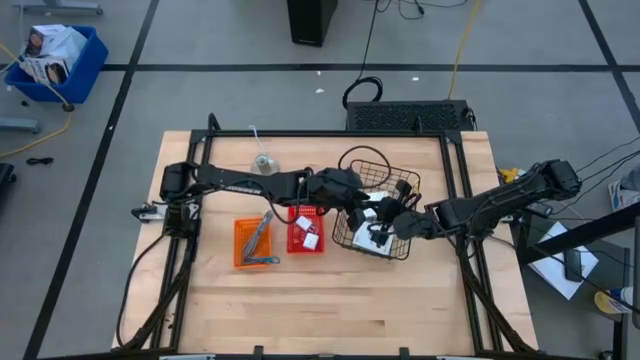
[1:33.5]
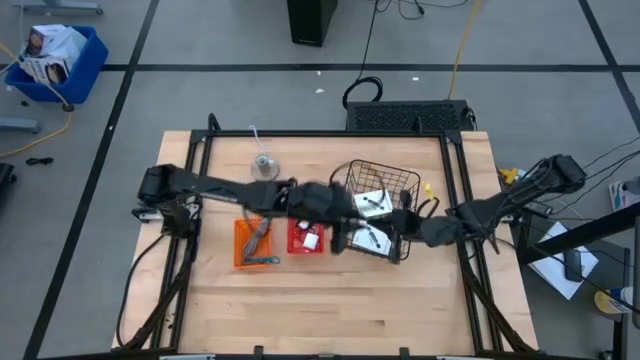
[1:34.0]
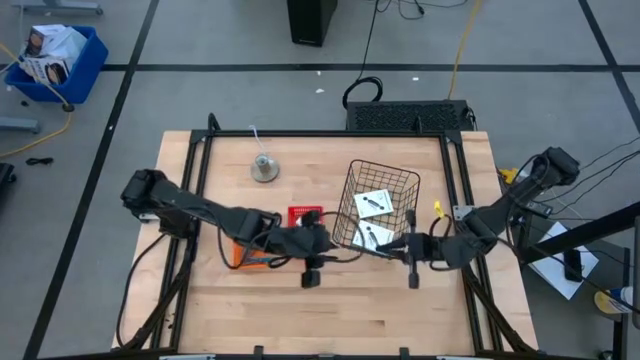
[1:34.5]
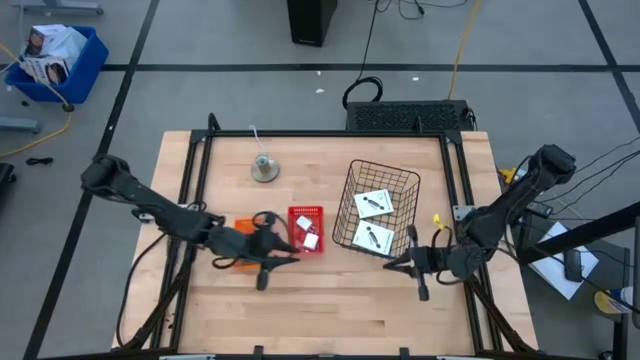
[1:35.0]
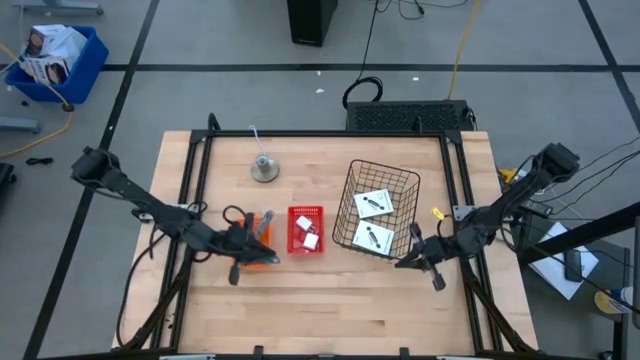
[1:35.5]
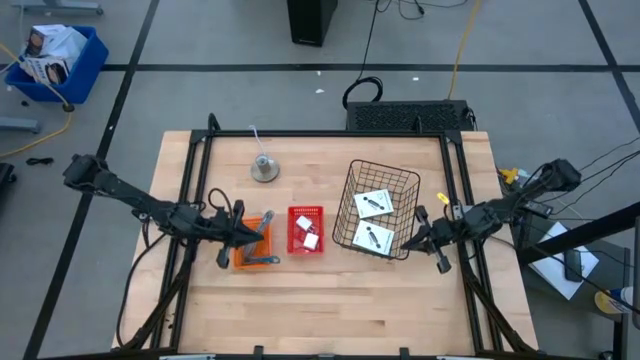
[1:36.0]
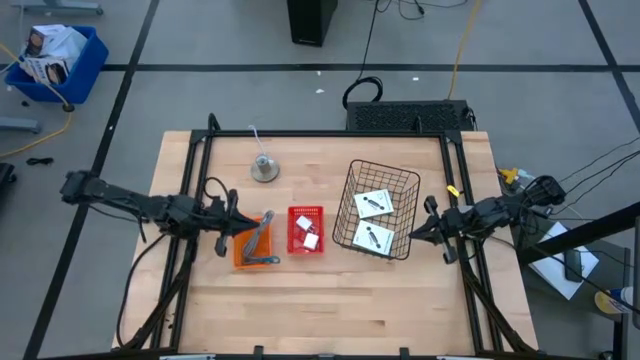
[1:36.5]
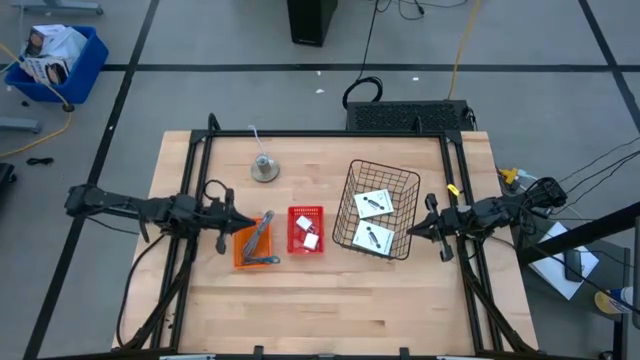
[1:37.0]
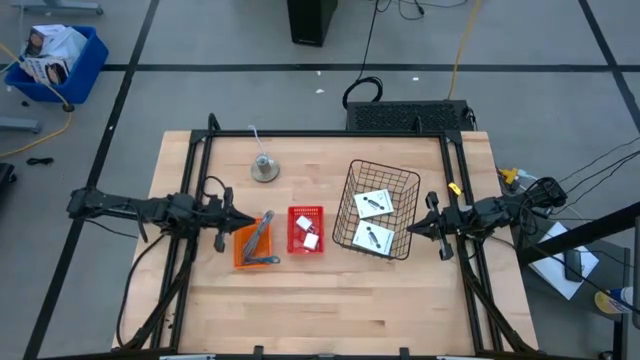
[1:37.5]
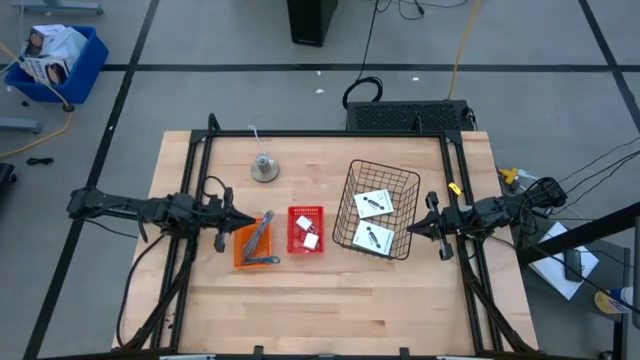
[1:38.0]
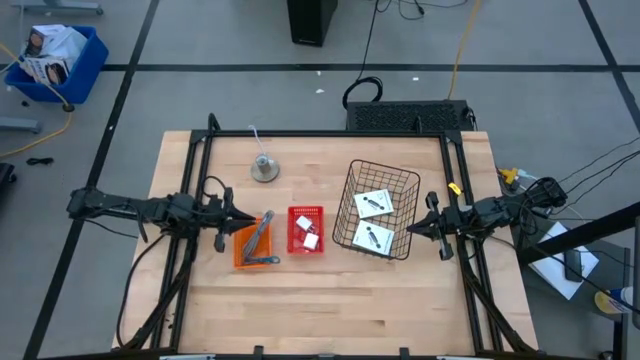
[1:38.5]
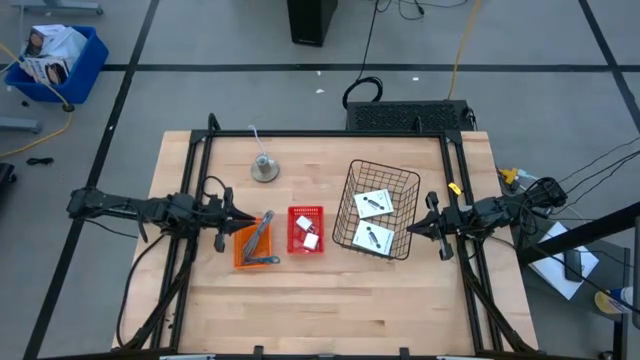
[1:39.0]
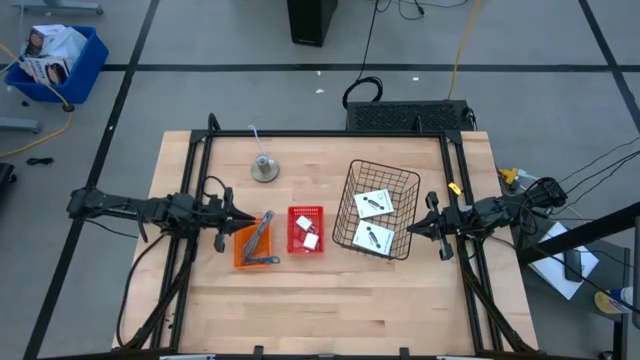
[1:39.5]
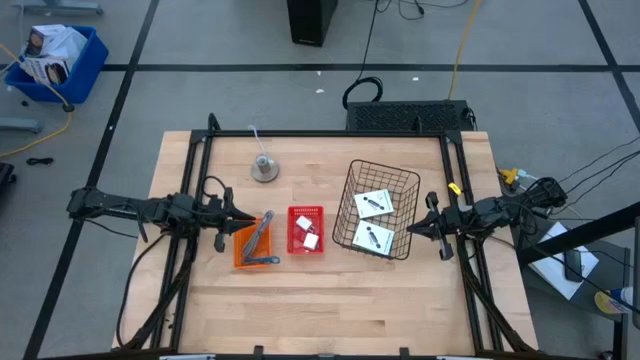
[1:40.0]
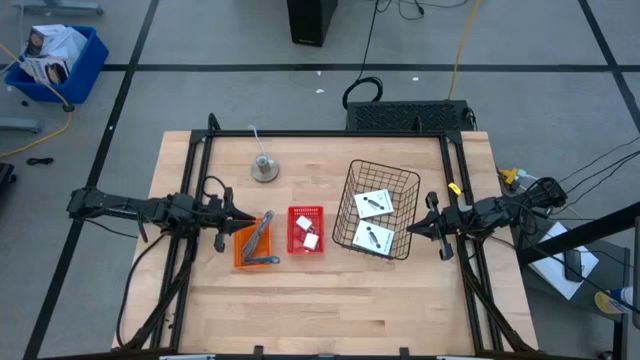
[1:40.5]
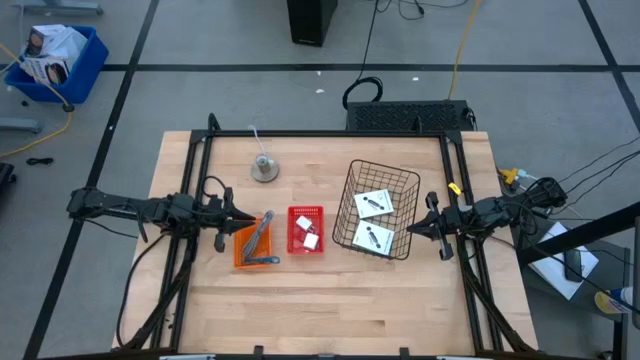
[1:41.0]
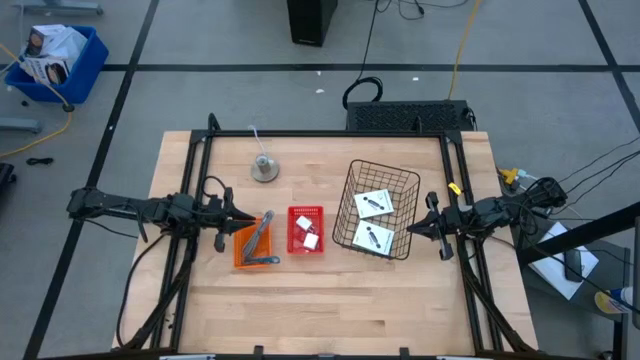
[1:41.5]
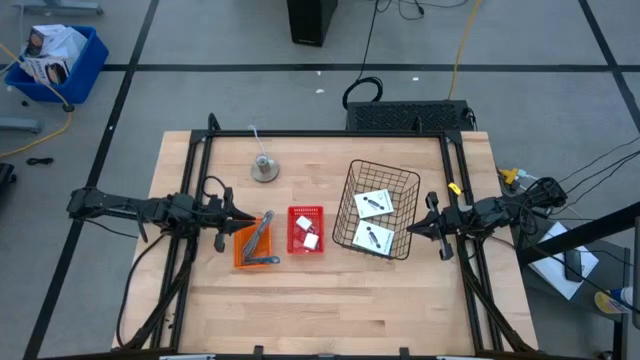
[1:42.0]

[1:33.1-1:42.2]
Task: Pick and place items into bin
Return to Home Position

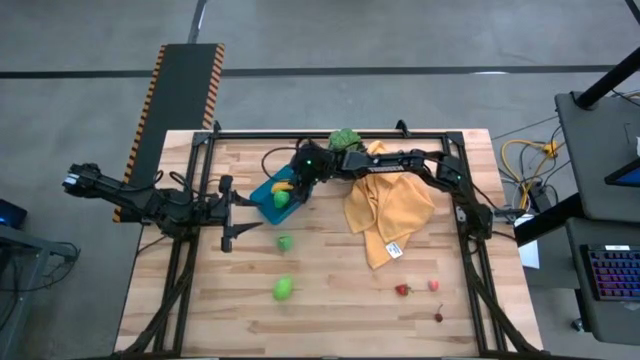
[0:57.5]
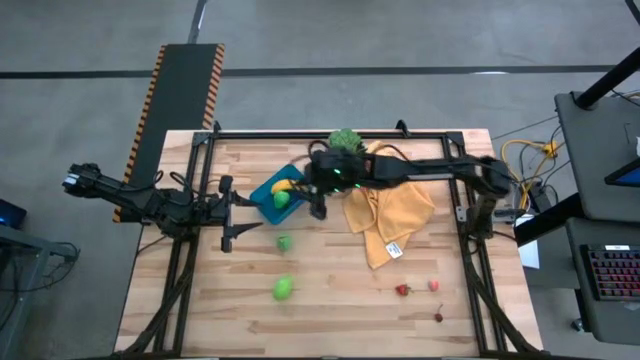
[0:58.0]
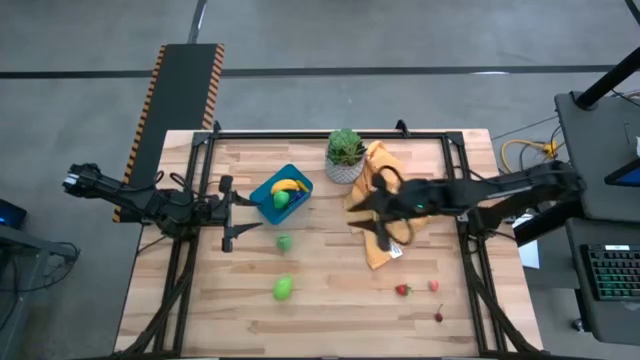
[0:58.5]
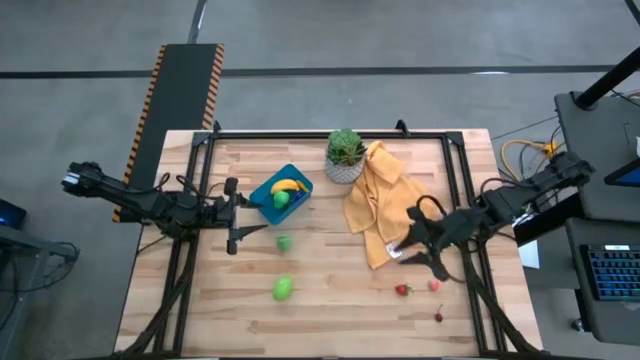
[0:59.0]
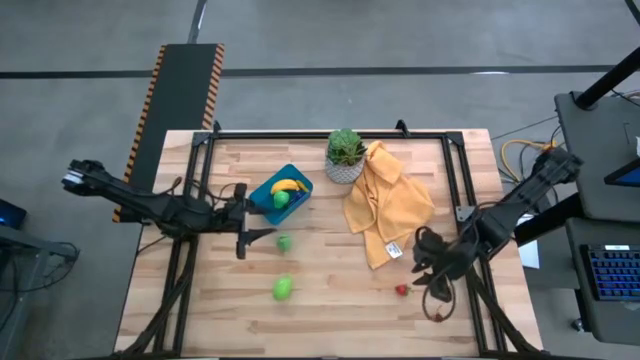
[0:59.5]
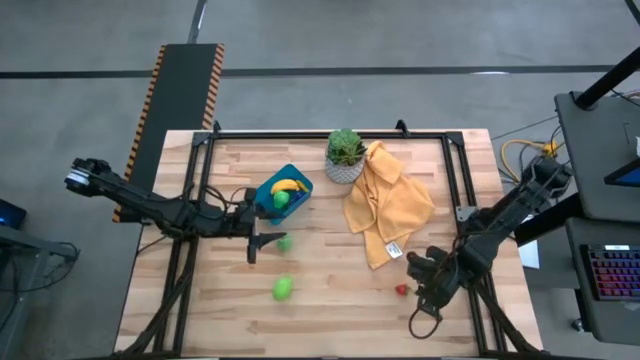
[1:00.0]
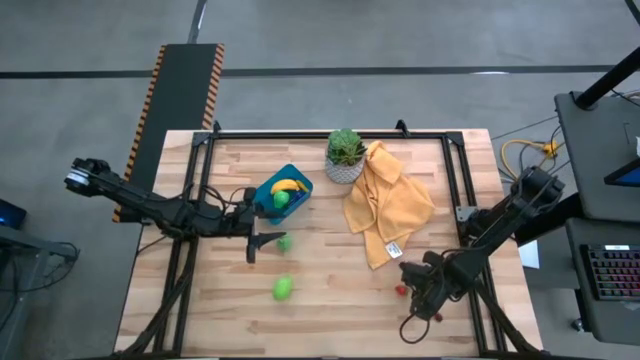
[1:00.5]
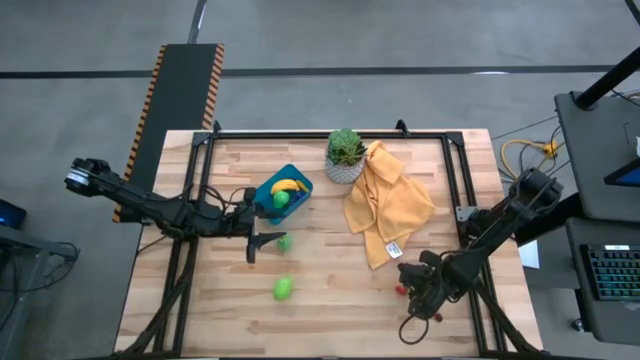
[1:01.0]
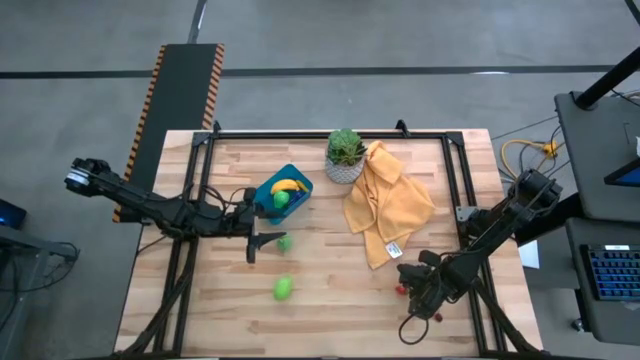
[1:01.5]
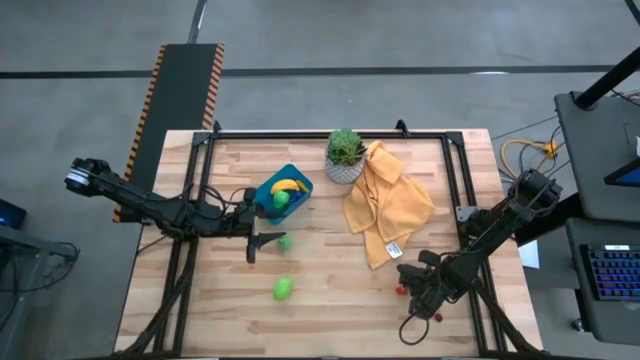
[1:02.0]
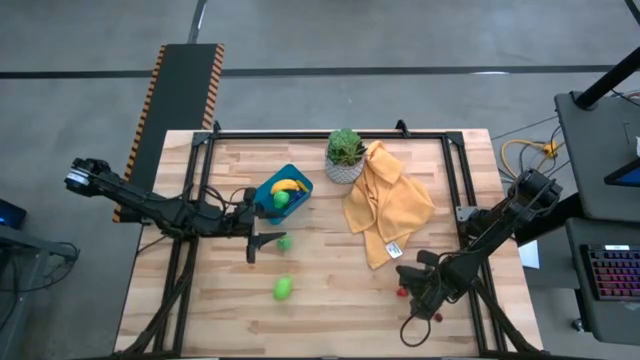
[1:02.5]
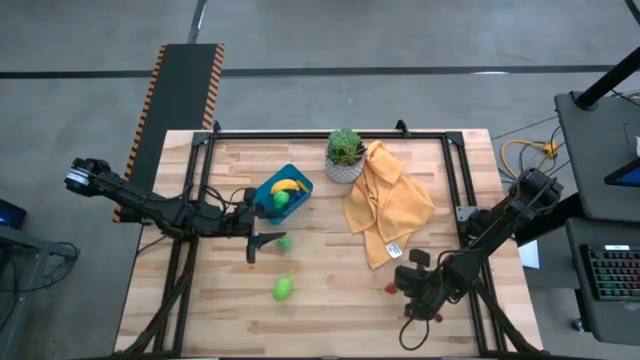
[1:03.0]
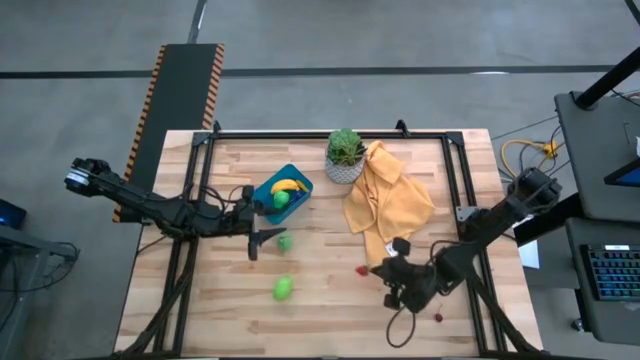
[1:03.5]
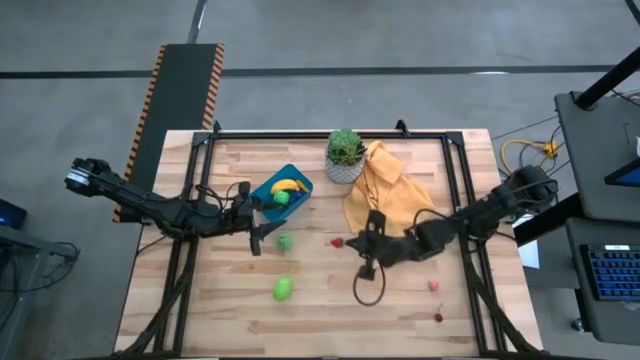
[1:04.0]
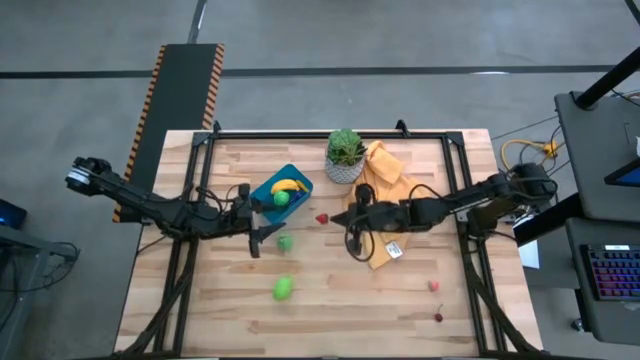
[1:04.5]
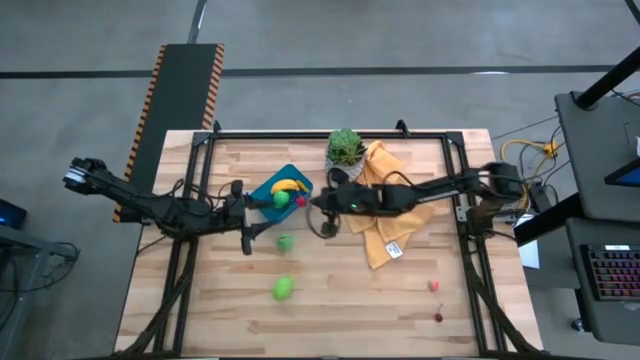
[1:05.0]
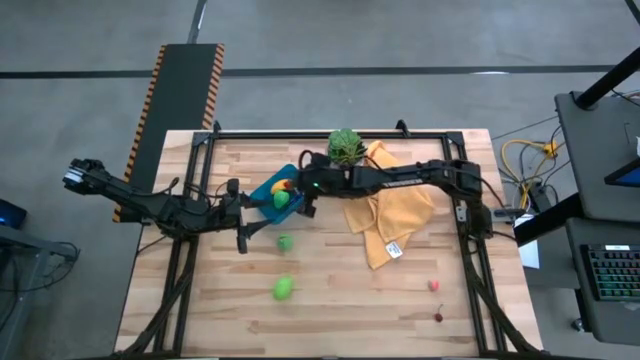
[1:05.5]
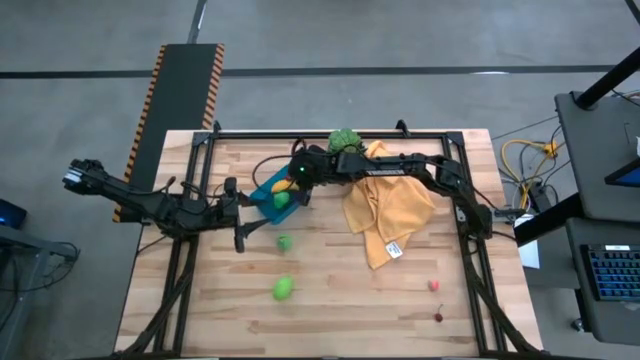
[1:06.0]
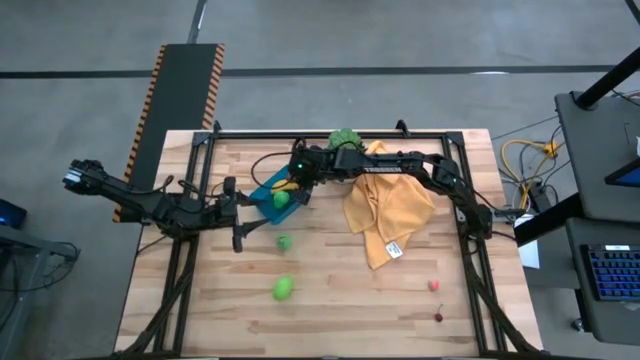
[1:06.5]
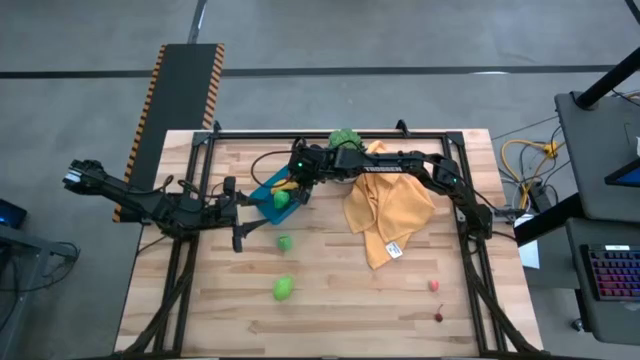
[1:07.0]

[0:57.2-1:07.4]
Task: Pick and placing Produce into tupperware
Put the red strawberry into the blue bin
